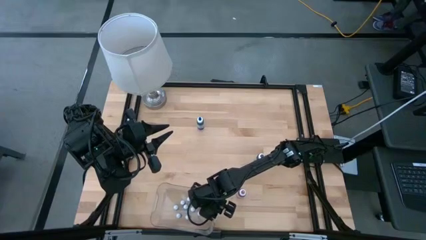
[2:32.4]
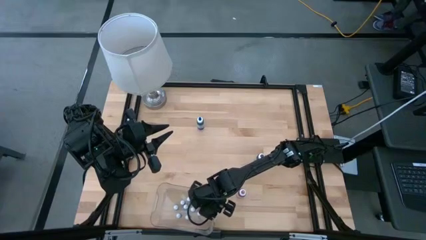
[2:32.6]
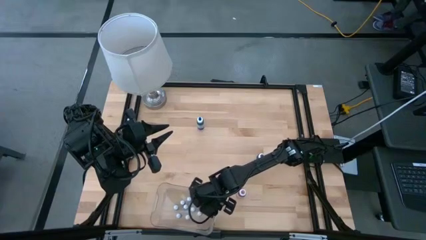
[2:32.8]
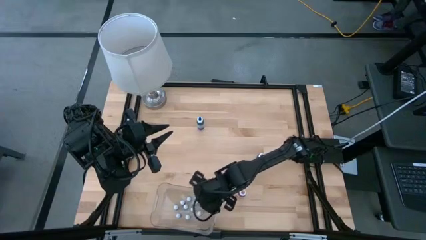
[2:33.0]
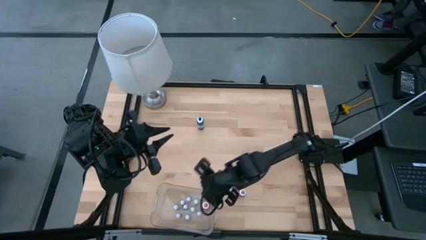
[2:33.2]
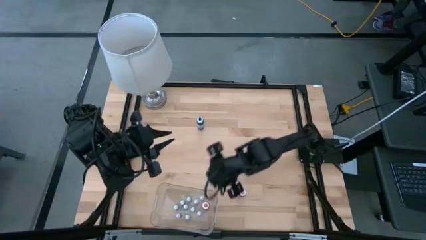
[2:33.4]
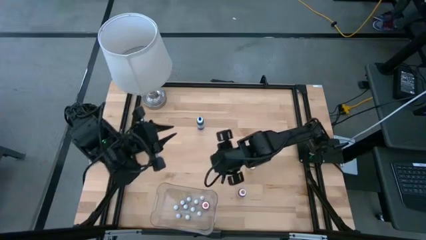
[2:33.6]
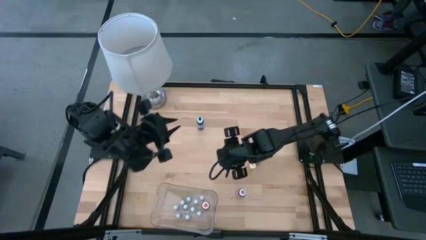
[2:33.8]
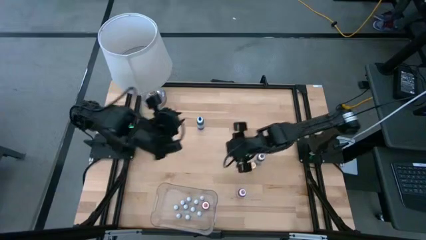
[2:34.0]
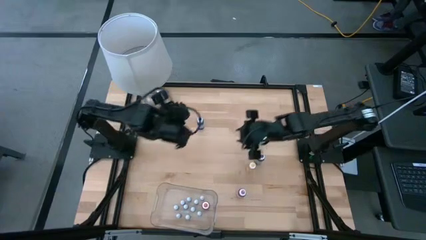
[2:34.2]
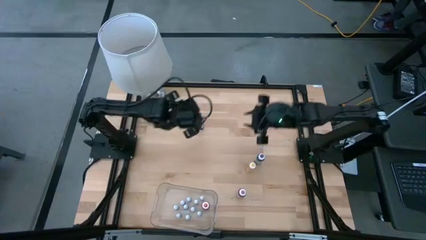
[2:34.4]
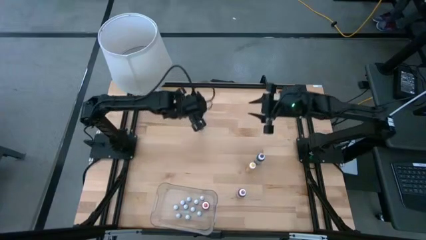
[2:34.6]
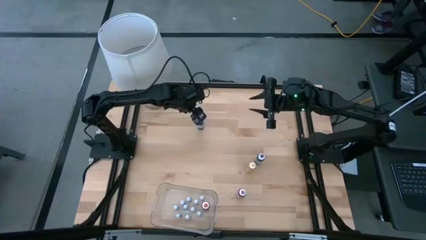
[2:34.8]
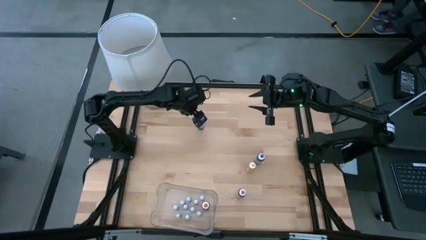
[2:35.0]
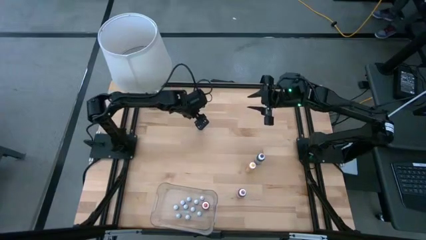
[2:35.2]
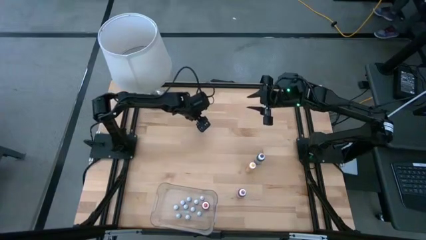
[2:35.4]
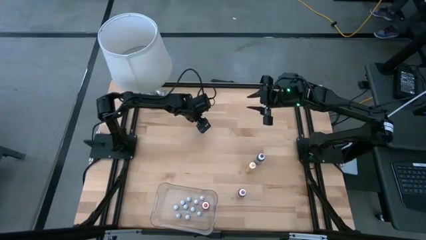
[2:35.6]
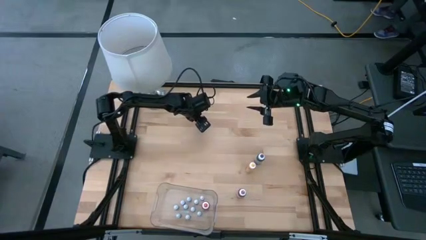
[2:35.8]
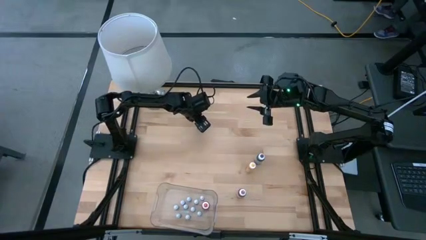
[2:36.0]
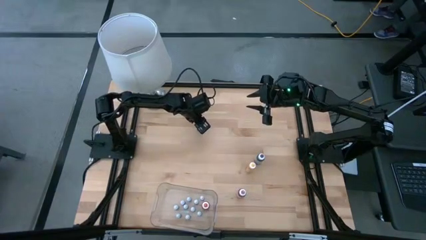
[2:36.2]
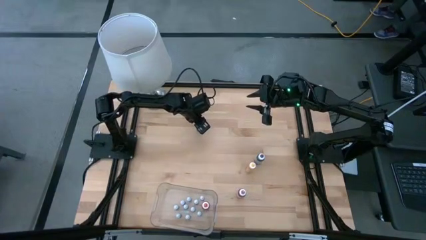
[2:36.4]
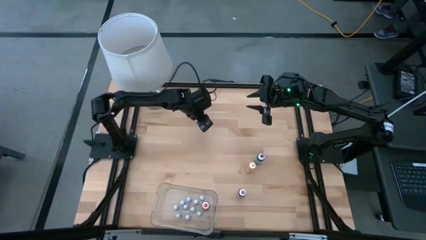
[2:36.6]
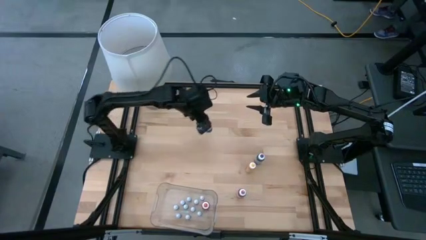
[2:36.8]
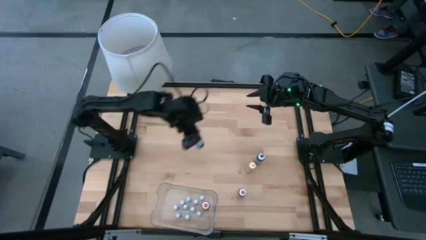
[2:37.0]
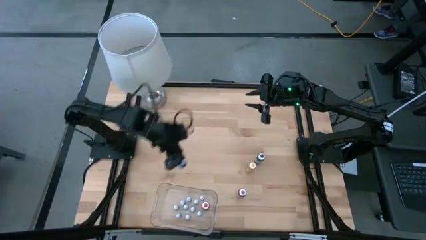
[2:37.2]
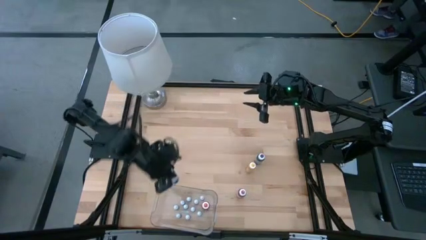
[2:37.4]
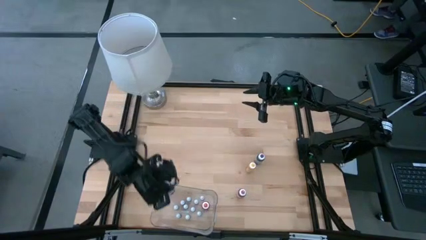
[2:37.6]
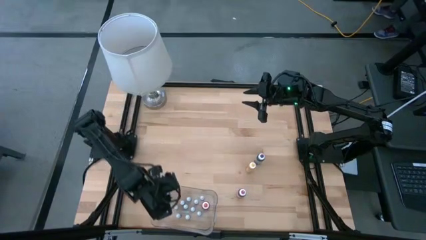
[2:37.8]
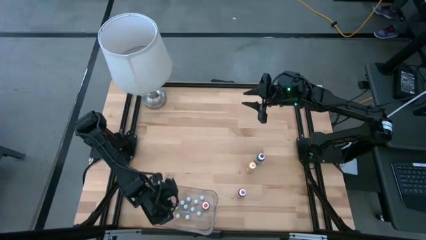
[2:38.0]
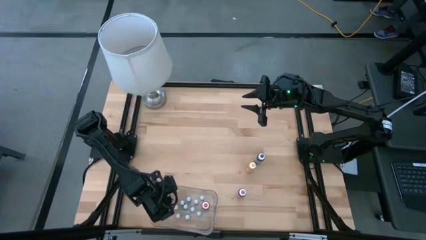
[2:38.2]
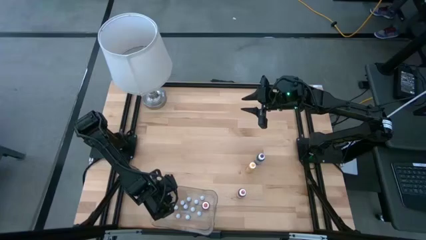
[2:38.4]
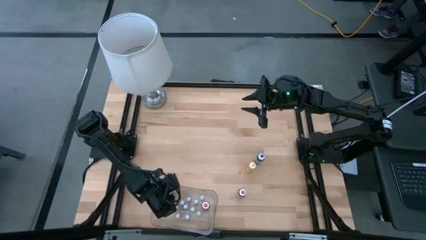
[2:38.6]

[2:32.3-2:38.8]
Task: Pick & Place food coloring
Put the large blue food coloring bottle into the bin

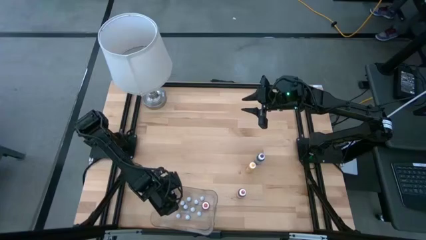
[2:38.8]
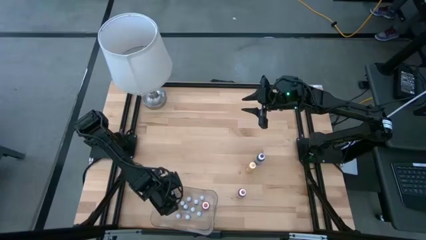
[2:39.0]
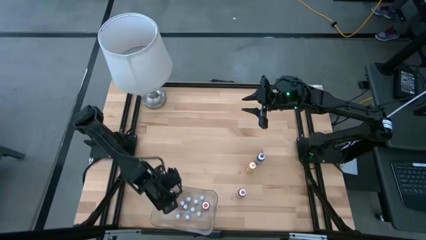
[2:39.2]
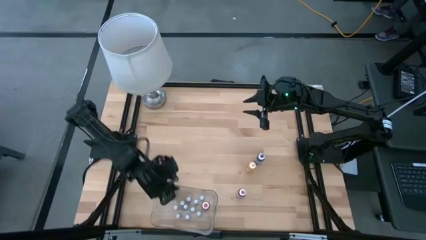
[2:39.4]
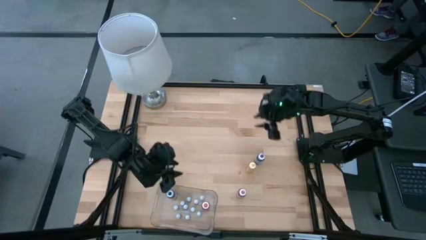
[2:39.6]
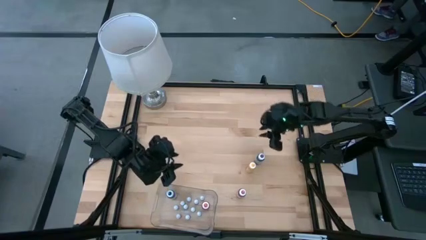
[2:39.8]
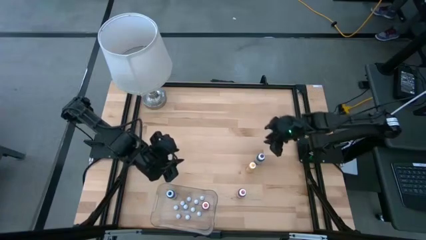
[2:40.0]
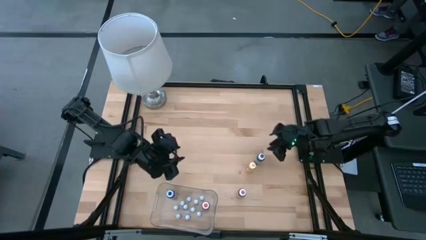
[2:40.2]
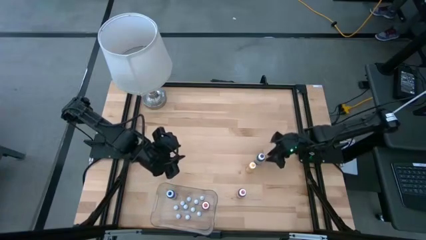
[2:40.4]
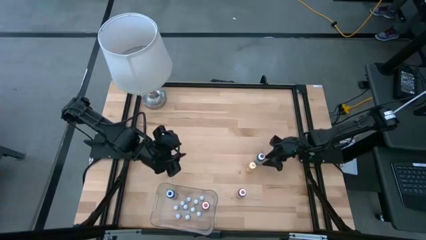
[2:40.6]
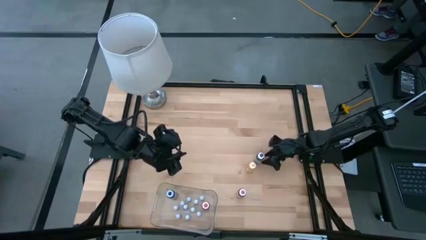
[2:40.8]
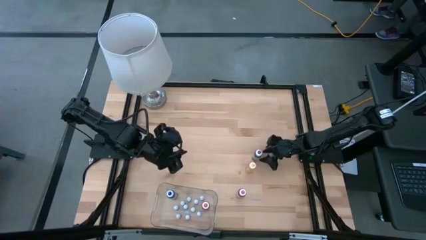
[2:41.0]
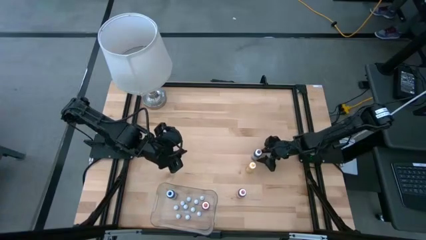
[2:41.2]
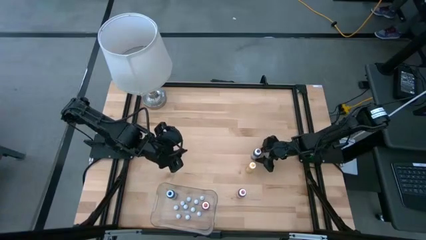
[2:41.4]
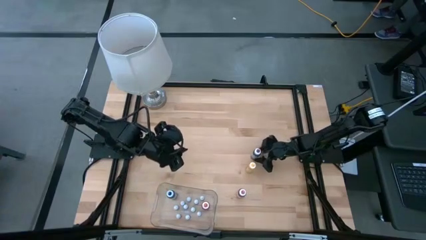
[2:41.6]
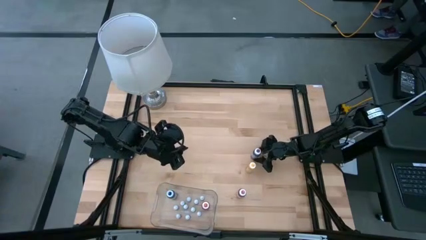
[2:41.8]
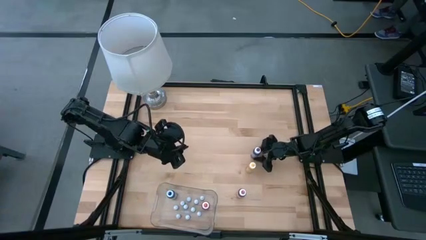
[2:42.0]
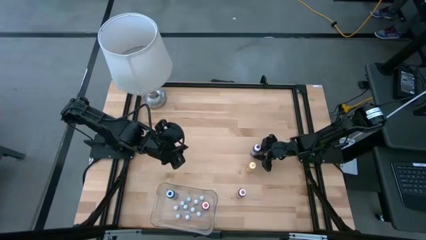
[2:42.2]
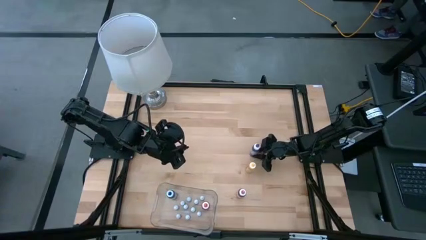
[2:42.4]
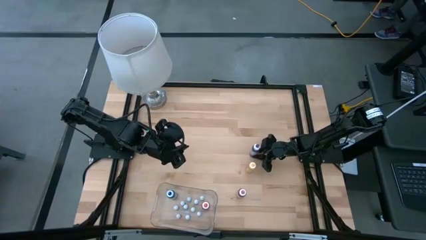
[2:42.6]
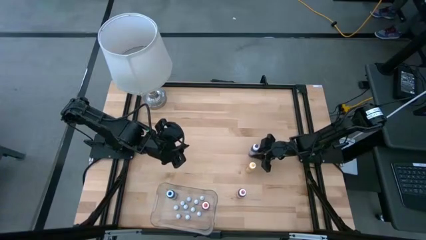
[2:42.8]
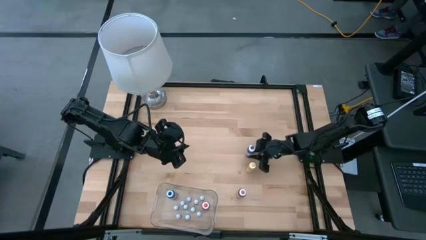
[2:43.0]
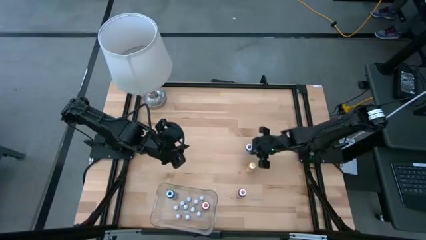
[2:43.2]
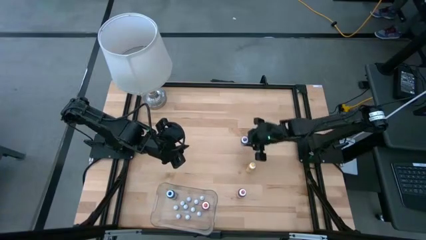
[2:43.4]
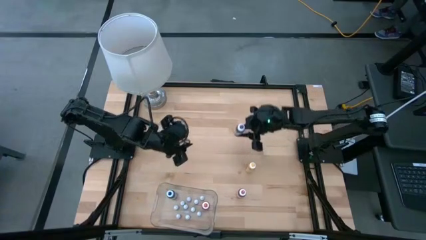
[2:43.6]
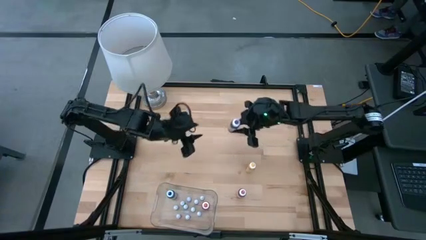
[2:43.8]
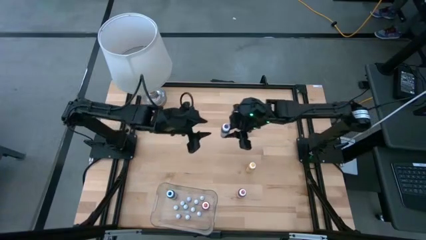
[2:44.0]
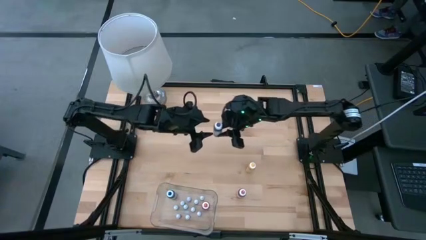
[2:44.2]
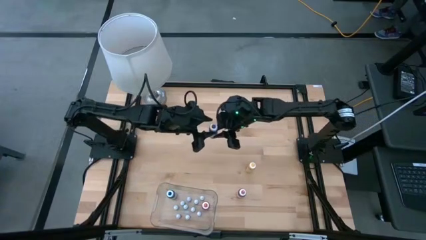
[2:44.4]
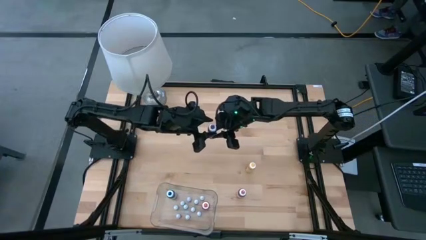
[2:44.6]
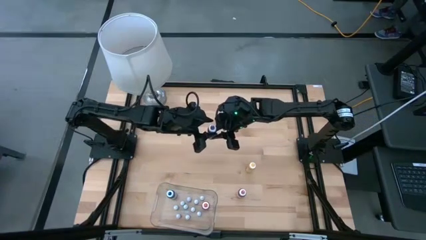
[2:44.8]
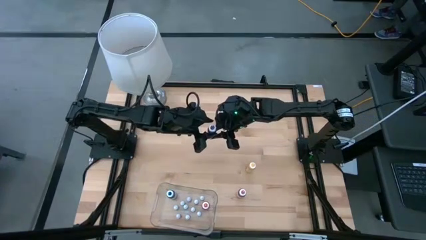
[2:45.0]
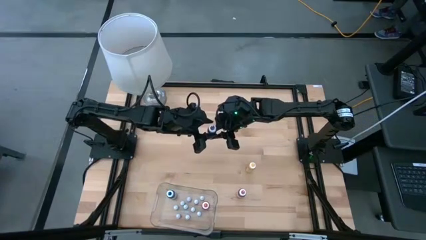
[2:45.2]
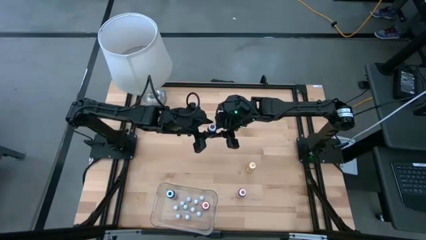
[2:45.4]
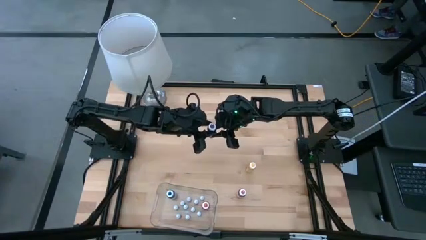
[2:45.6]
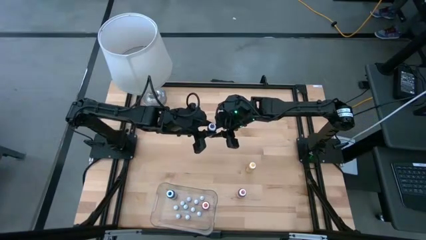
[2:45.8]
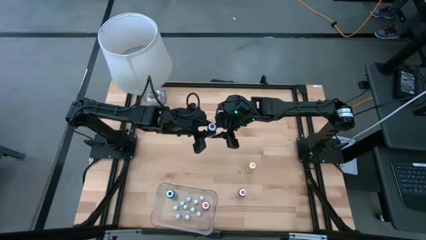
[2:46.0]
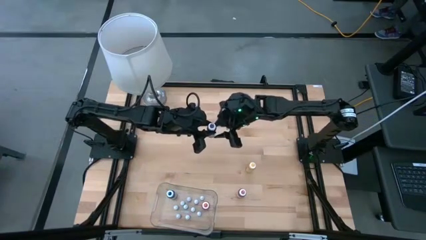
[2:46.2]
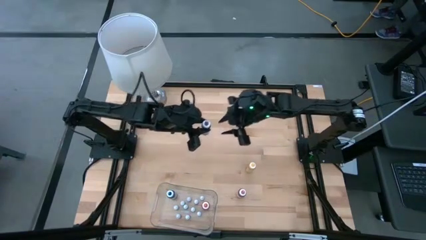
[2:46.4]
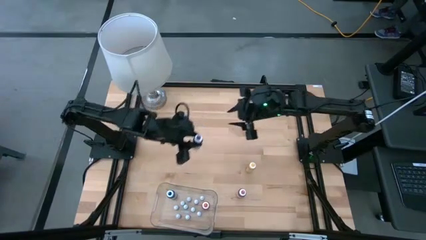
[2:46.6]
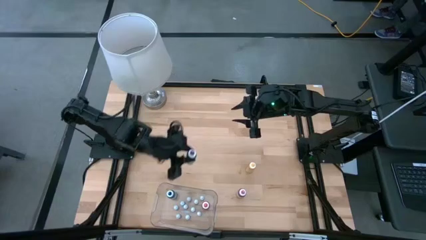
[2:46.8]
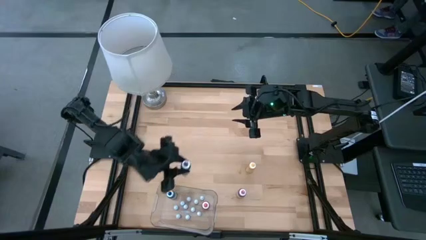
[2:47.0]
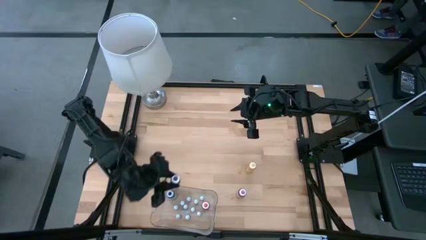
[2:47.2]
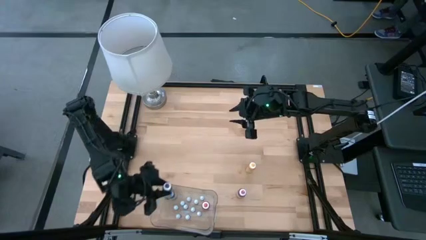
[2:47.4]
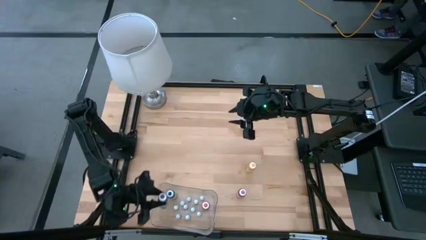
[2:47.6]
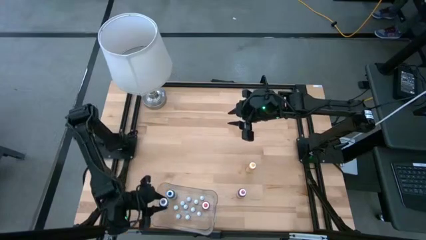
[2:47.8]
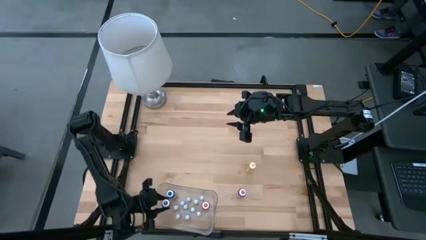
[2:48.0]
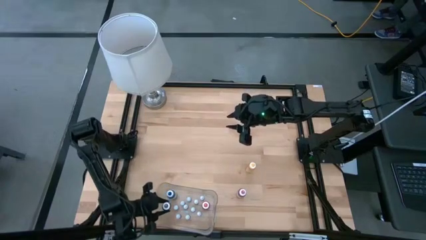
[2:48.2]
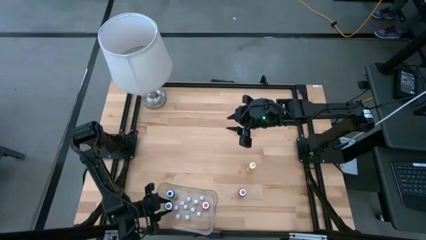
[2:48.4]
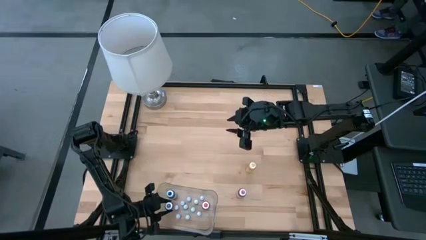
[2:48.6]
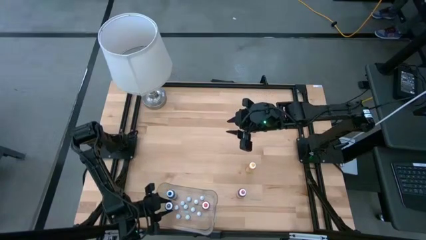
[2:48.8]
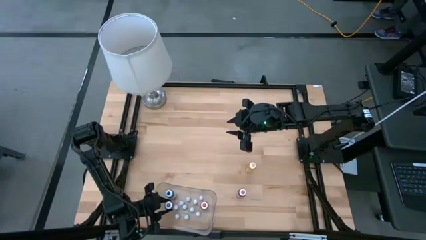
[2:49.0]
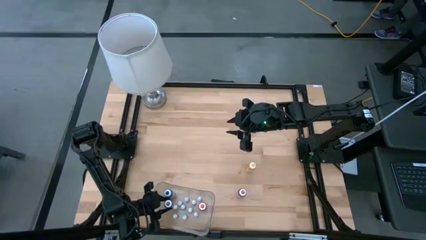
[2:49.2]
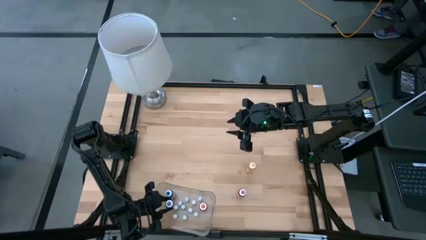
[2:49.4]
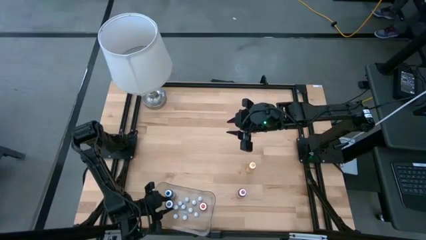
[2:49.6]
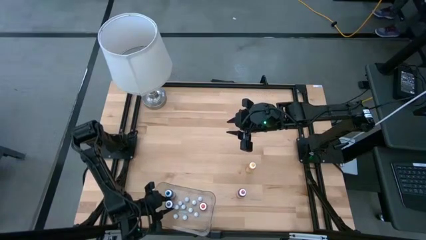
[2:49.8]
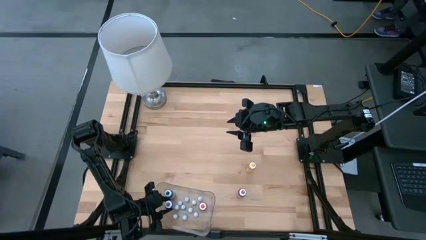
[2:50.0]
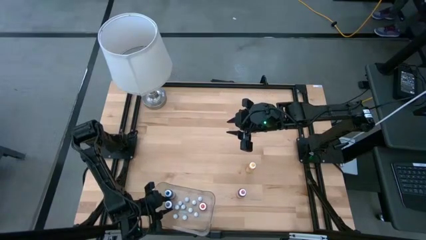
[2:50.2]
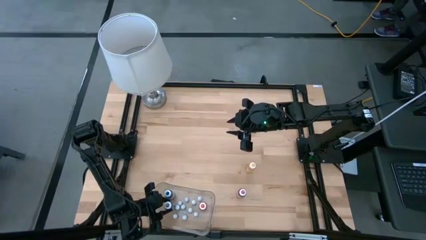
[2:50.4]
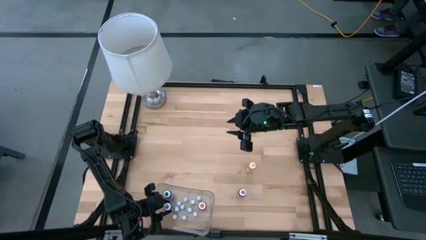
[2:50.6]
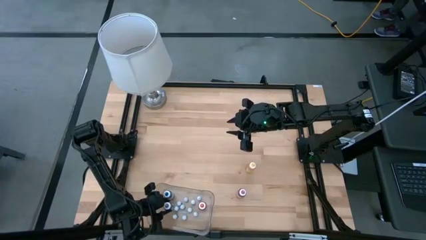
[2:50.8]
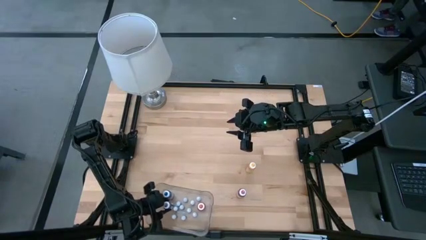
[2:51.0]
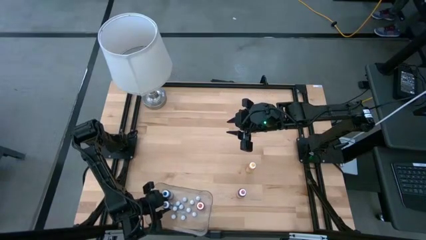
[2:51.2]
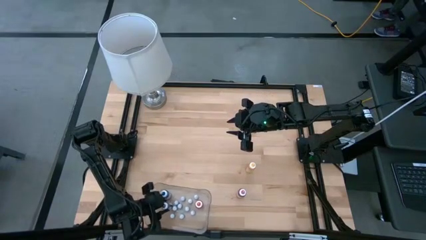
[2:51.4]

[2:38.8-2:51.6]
Put the large violet food coloring bottle into the bin
